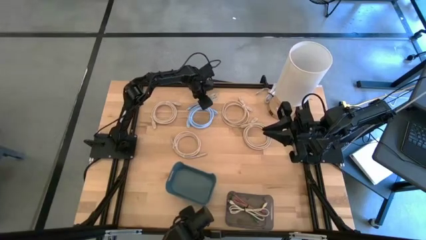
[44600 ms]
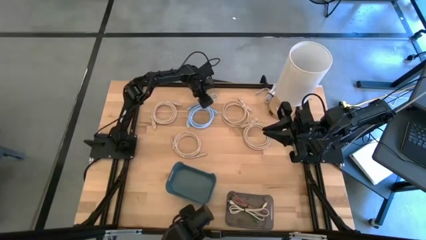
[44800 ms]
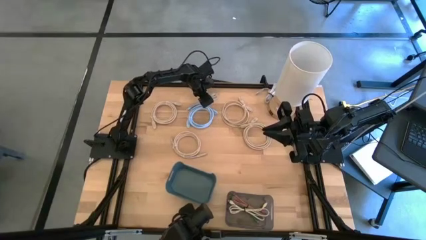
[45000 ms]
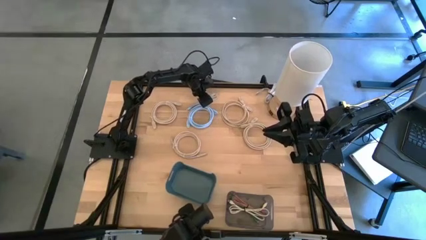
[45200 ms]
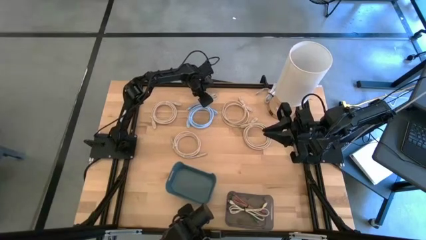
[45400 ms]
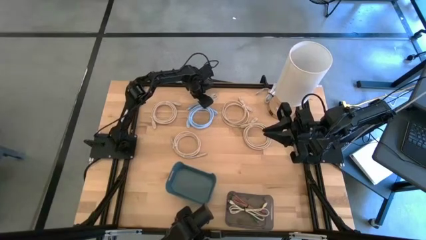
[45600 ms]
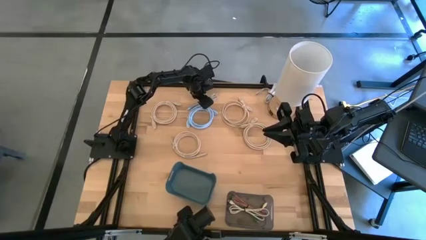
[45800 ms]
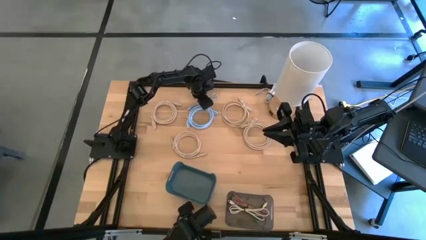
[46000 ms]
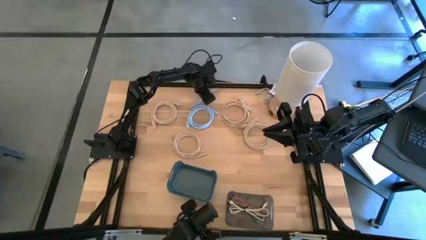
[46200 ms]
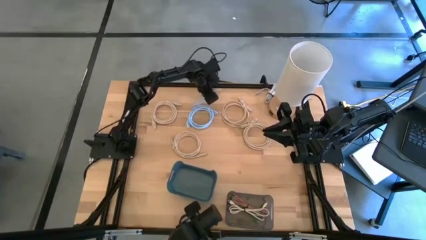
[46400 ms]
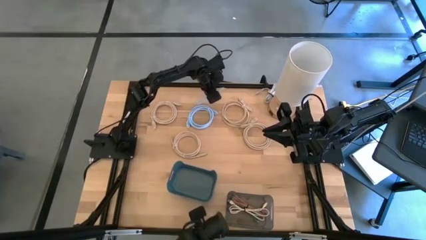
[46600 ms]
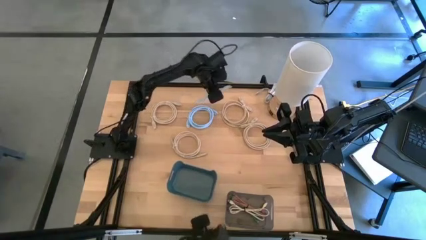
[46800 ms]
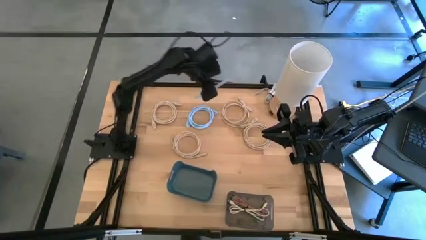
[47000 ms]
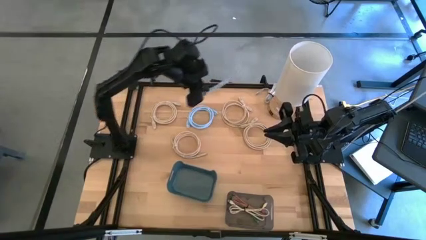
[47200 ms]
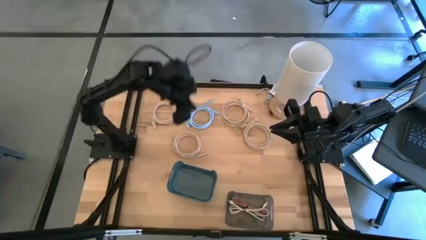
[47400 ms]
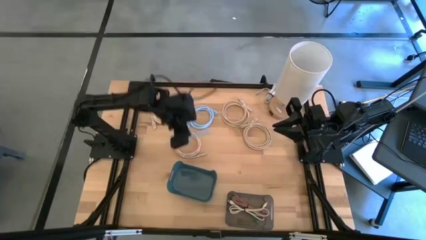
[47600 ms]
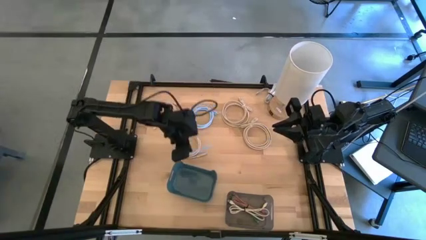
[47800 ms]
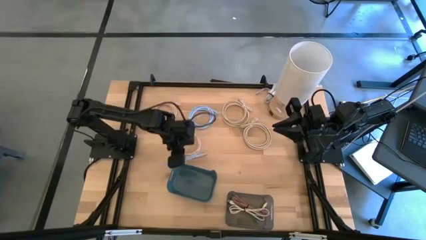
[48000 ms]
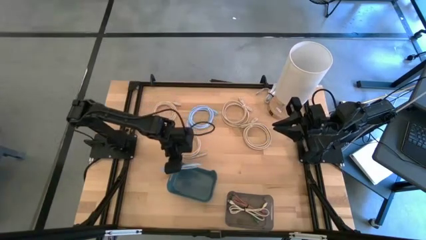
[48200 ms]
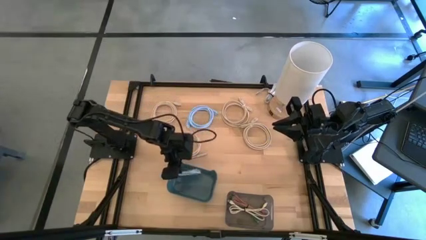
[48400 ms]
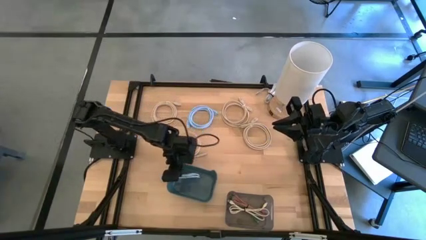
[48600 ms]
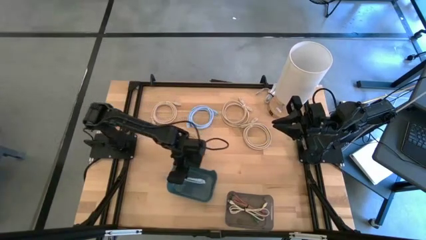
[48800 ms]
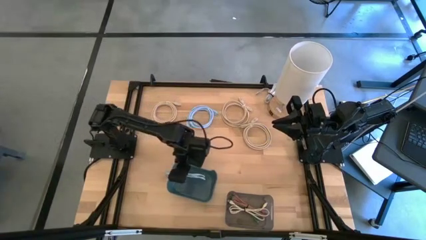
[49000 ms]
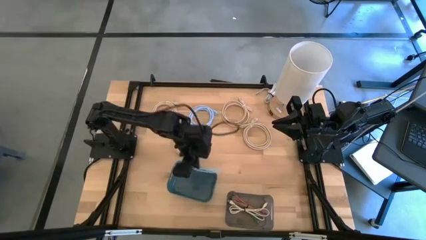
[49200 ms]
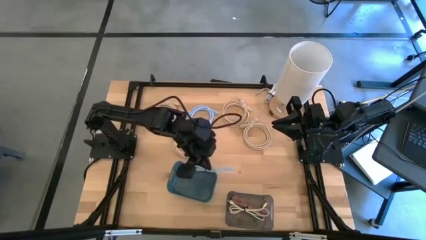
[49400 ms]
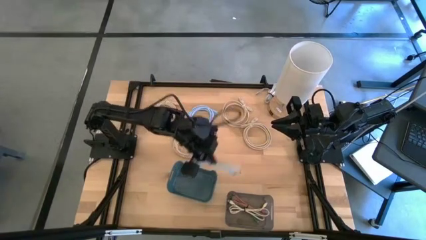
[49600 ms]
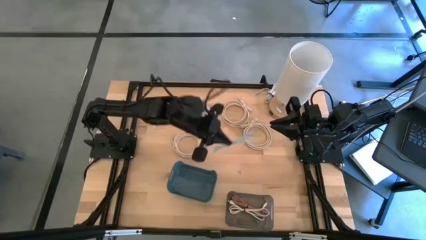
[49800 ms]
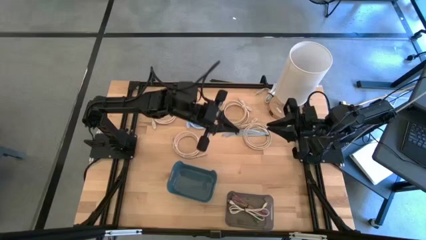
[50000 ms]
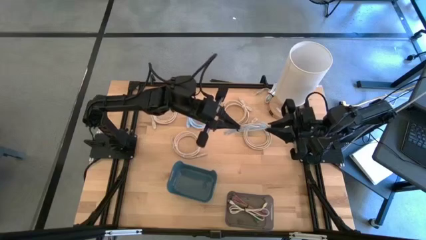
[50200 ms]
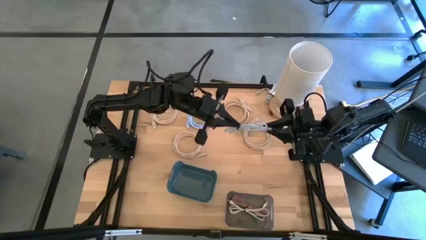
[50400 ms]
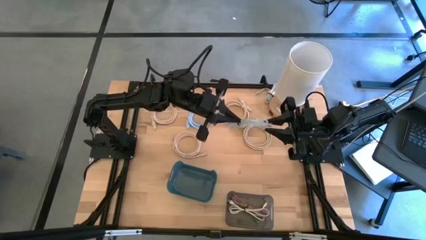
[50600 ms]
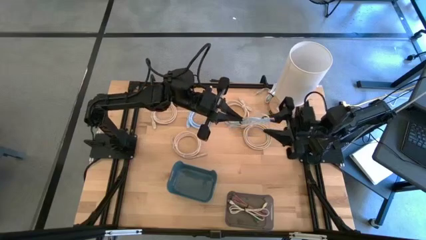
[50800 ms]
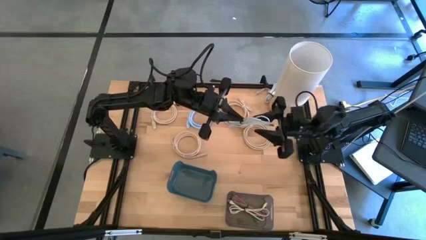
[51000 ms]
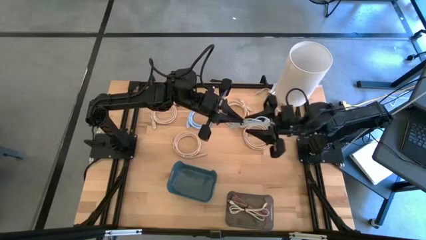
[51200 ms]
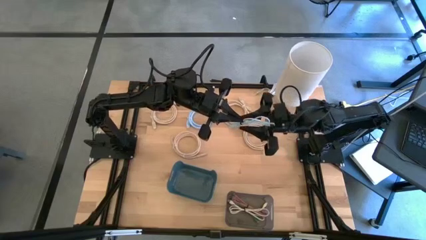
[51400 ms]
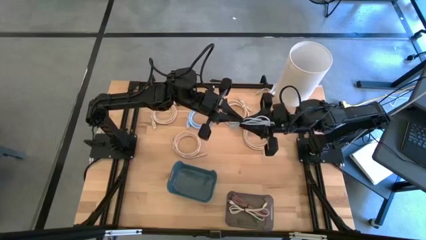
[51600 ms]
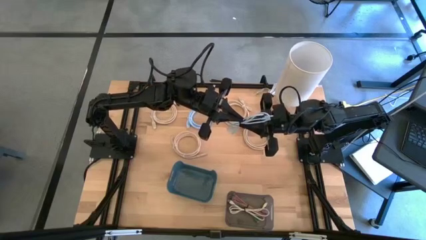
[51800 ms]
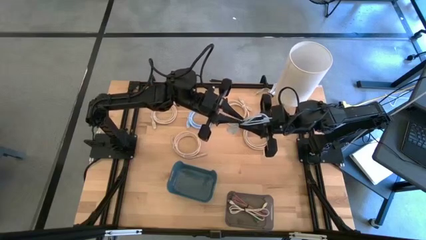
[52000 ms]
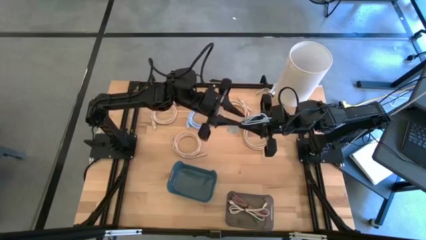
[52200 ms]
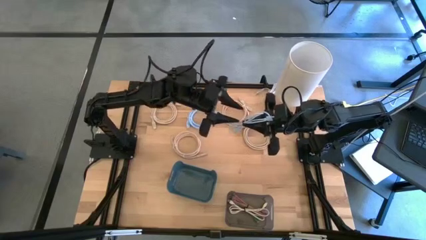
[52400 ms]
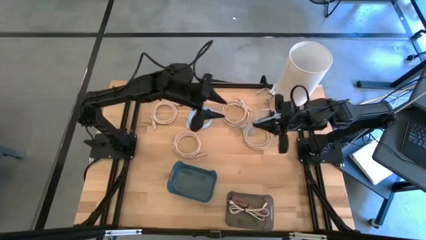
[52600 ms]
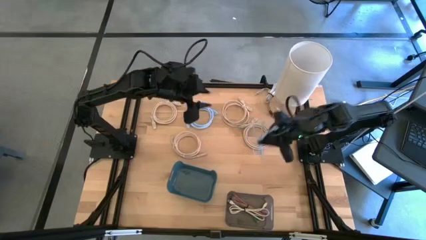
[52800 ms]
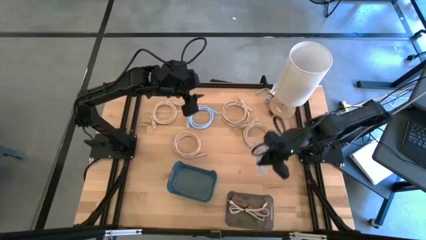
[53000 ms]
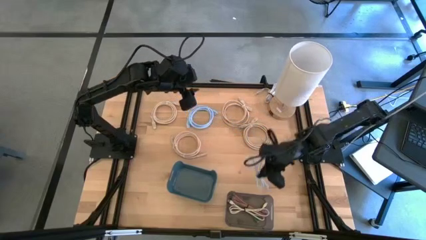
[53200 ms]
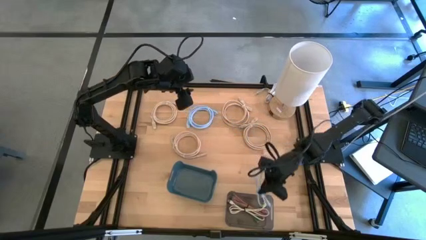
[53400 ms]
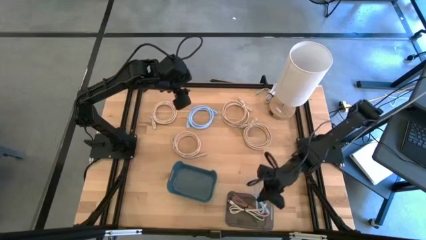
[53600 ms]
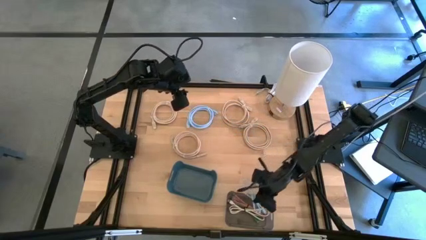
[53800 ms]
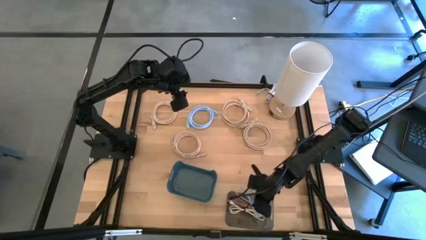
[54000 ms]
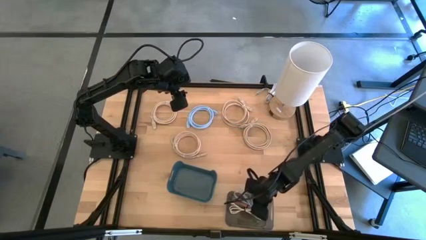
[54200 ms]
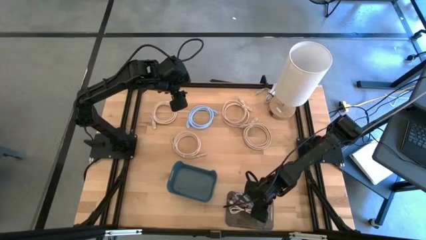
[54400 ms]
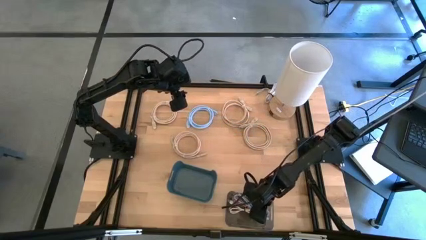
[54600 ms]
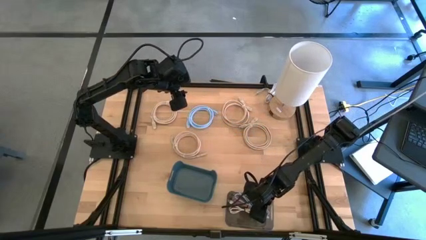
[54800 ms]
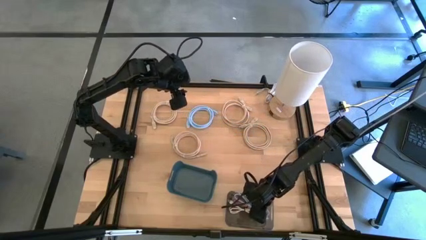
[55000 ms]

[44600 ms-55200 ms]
Put the blue charger cable into the black bin

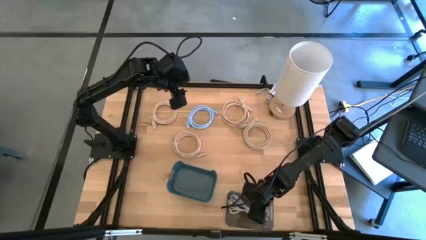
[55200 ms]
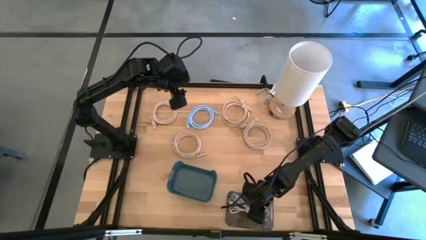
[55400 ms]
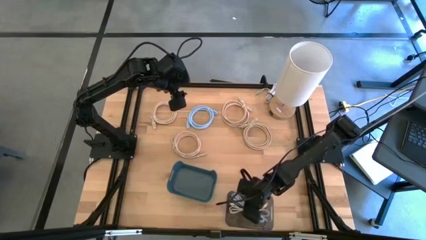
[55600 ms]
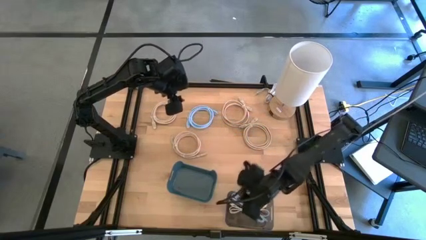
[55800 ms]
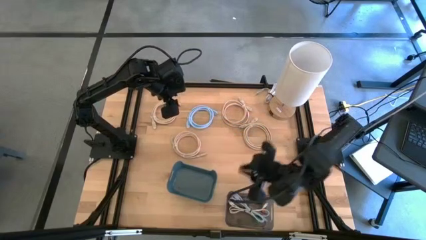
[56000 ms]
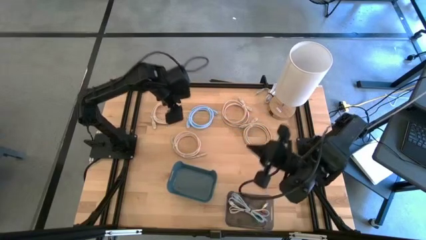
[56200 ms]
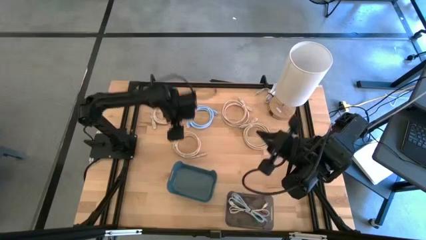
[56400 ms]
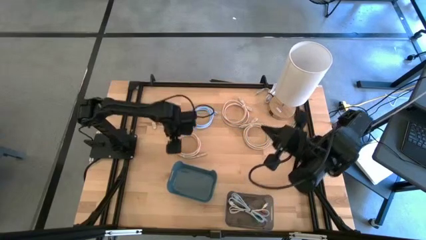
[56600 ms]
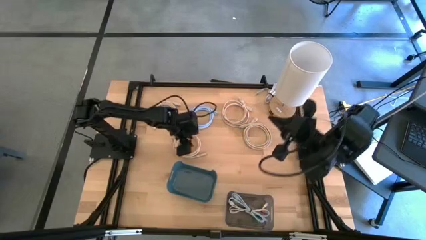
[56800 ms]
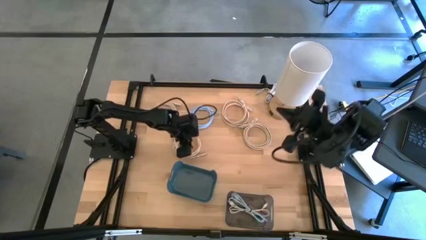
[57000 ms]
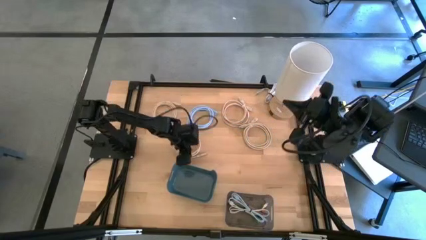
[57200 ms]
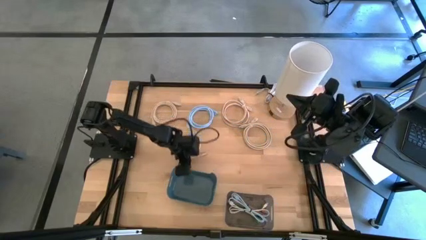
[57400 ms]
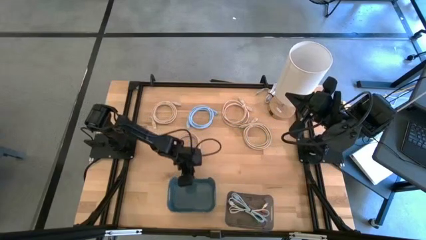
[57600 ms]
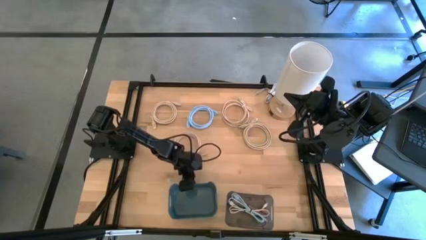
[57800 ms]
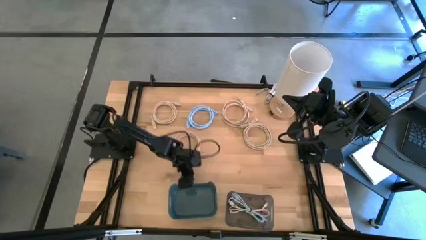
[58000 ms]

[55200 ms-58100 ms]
Adjust the blue bin
